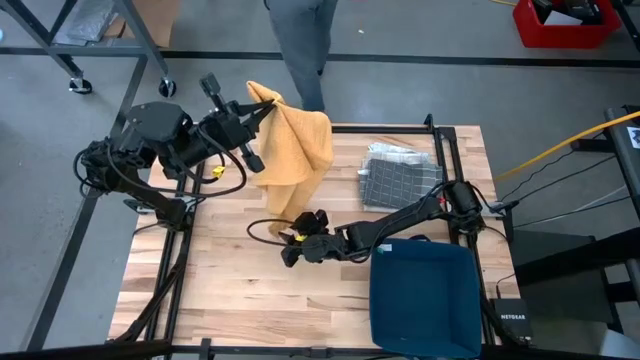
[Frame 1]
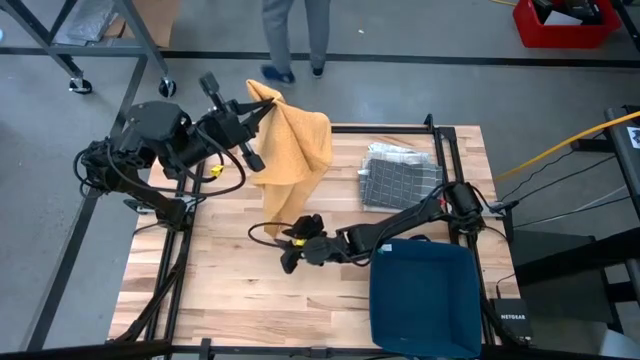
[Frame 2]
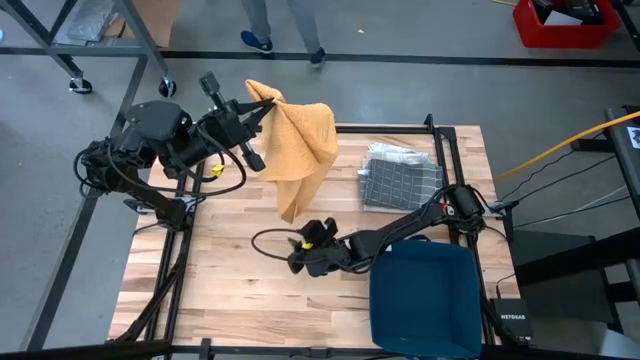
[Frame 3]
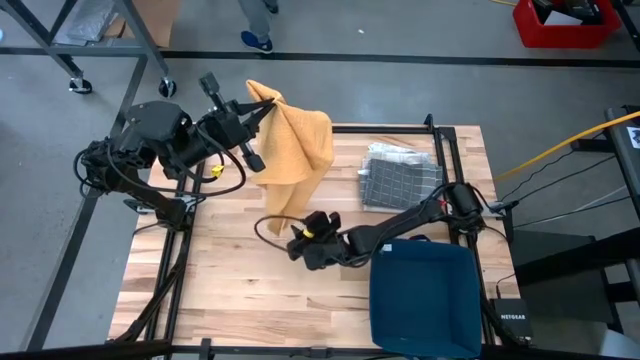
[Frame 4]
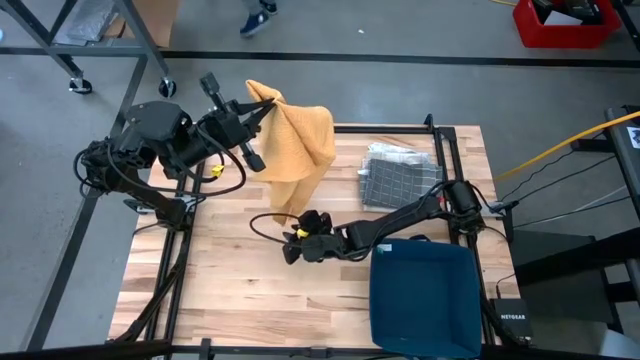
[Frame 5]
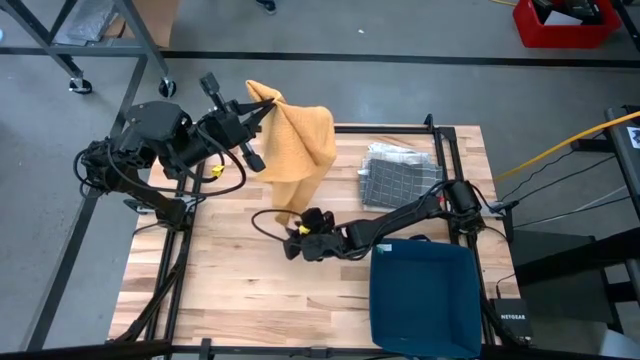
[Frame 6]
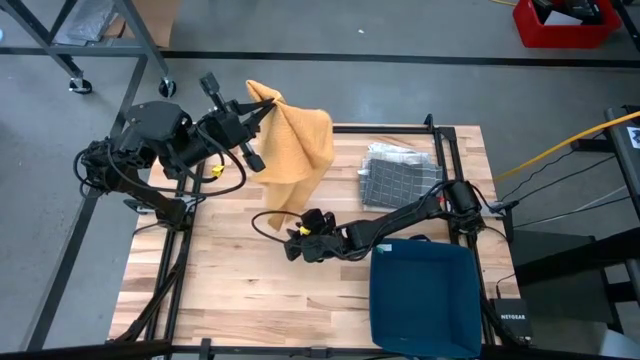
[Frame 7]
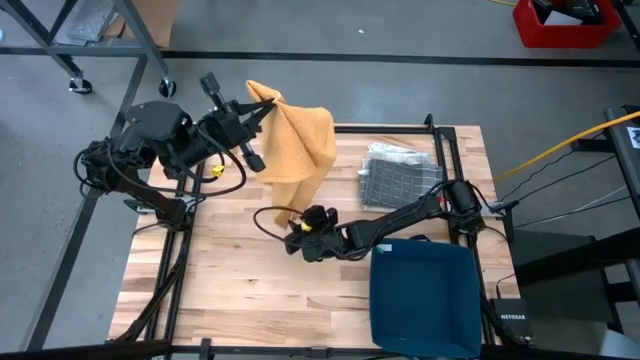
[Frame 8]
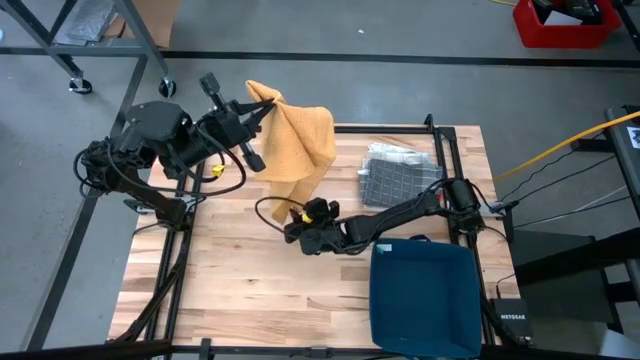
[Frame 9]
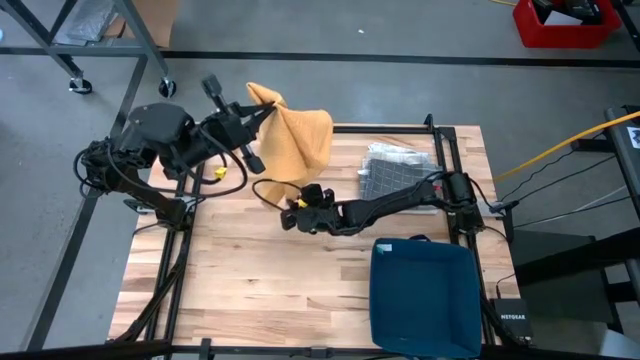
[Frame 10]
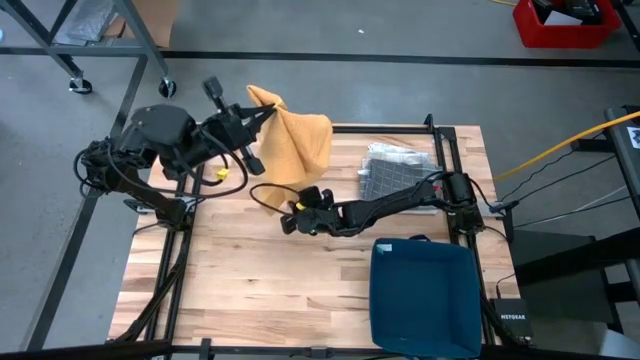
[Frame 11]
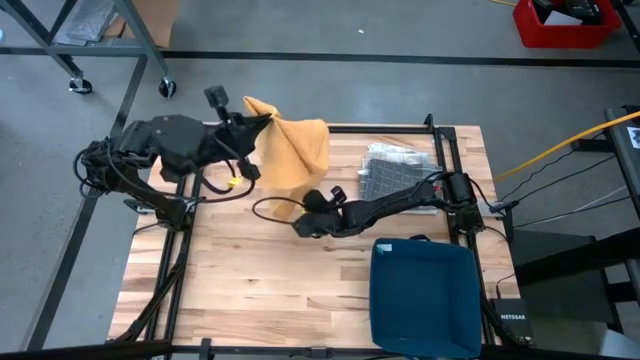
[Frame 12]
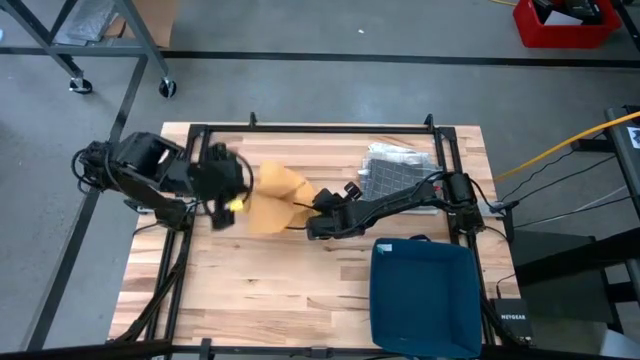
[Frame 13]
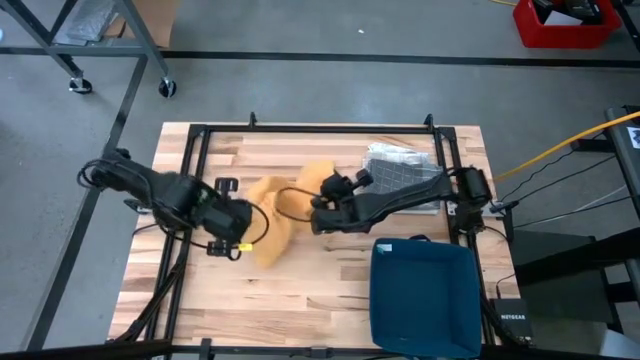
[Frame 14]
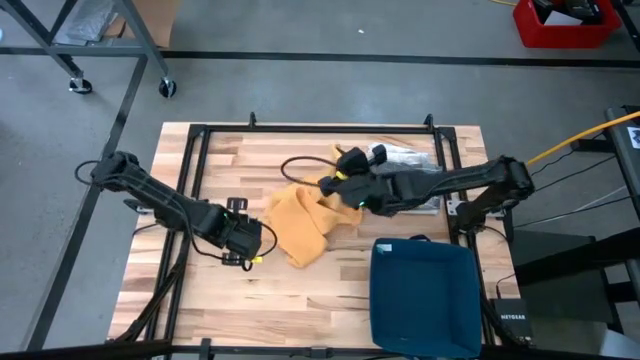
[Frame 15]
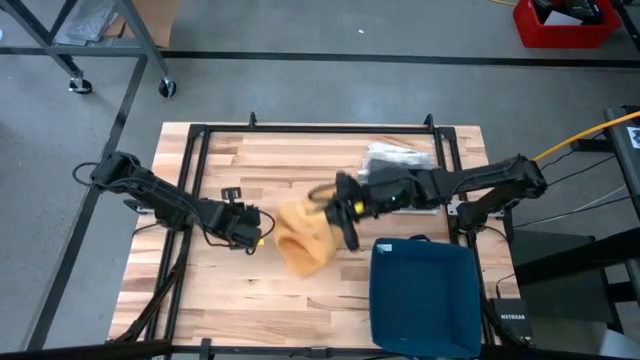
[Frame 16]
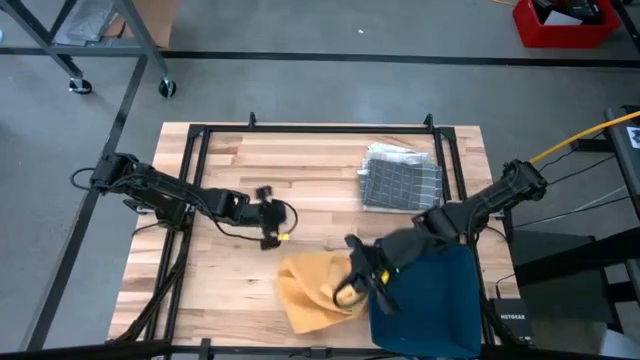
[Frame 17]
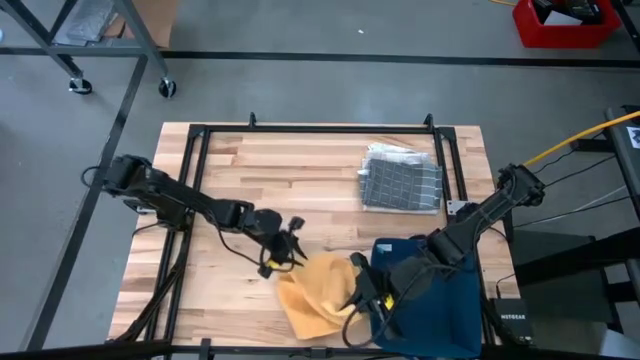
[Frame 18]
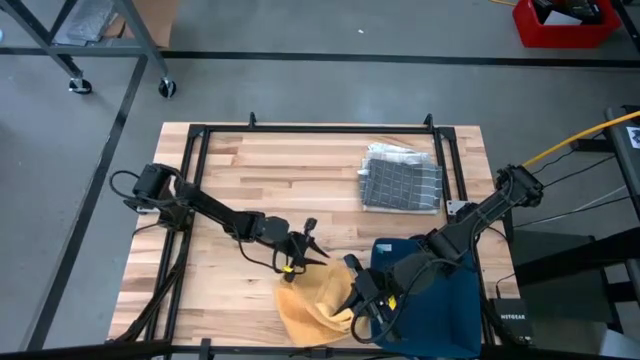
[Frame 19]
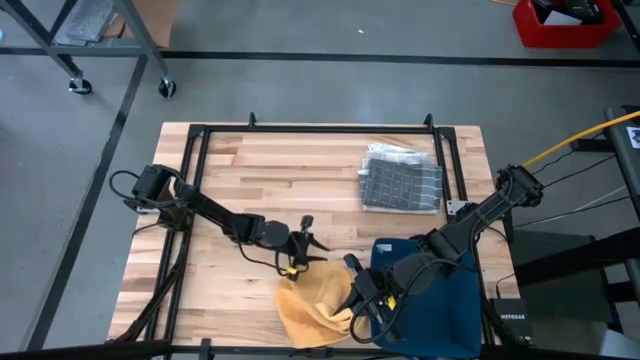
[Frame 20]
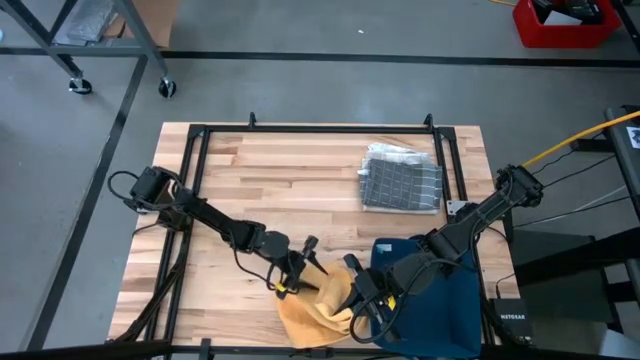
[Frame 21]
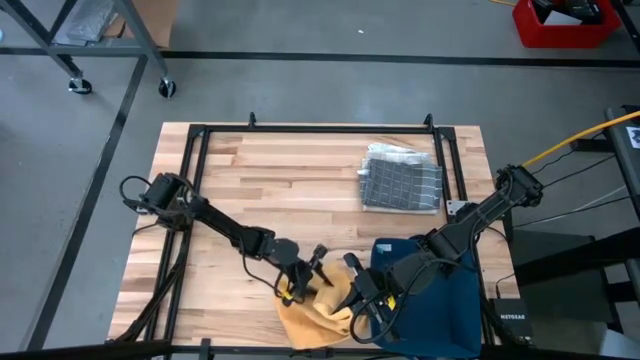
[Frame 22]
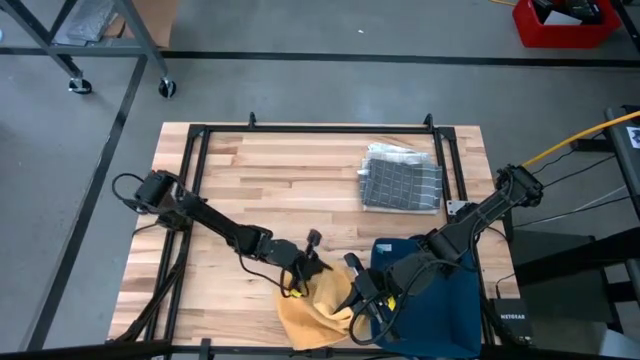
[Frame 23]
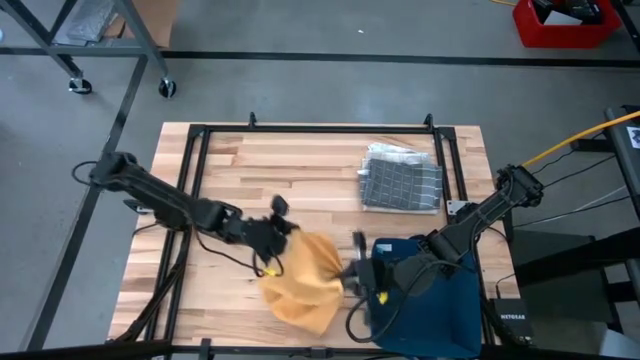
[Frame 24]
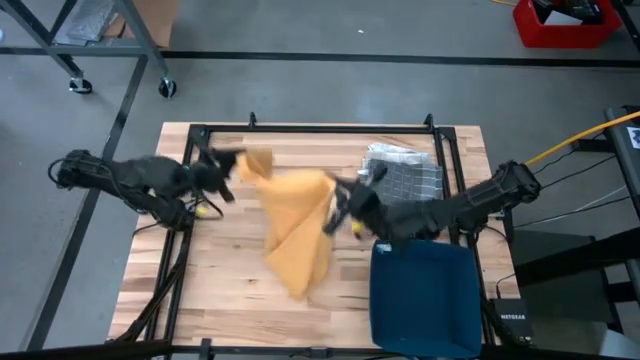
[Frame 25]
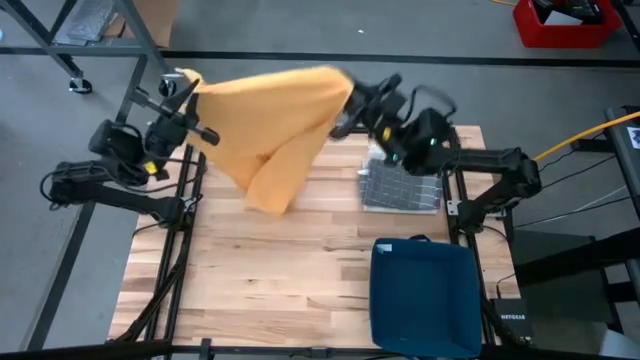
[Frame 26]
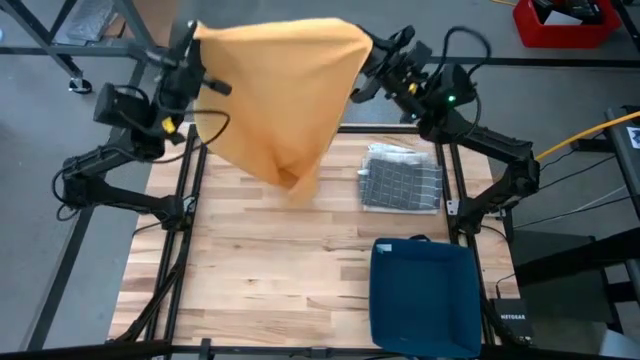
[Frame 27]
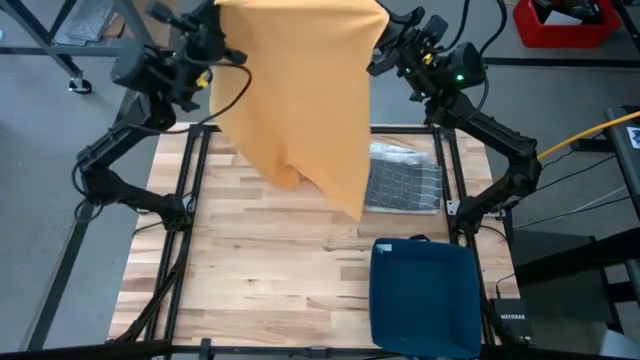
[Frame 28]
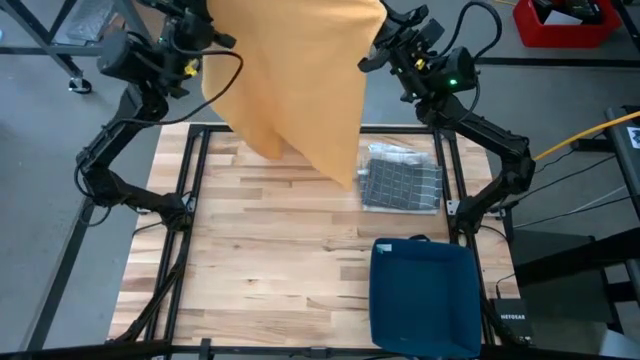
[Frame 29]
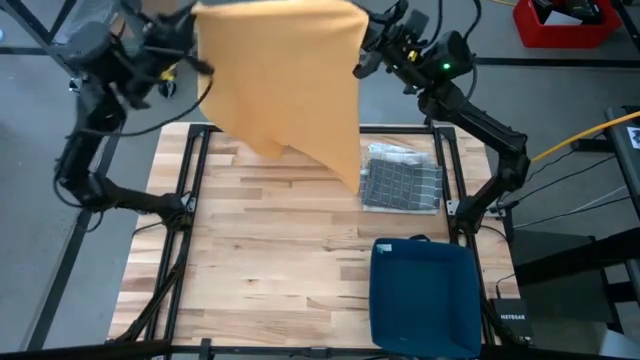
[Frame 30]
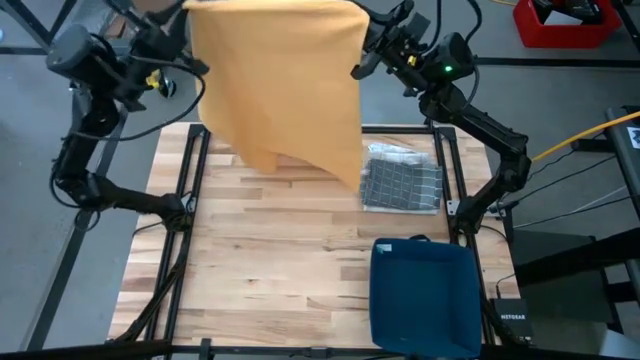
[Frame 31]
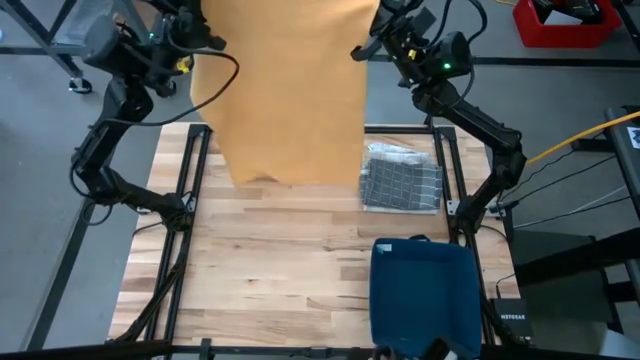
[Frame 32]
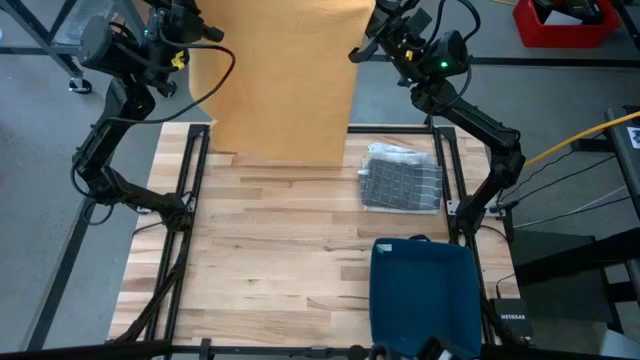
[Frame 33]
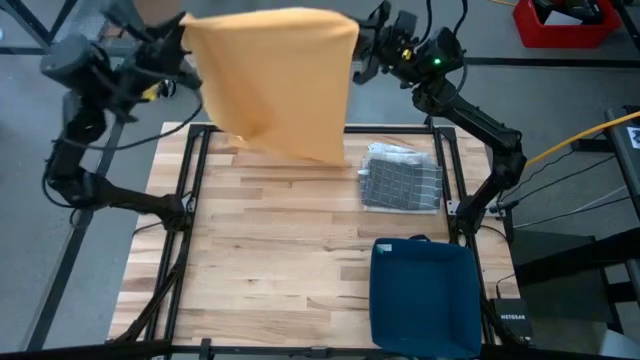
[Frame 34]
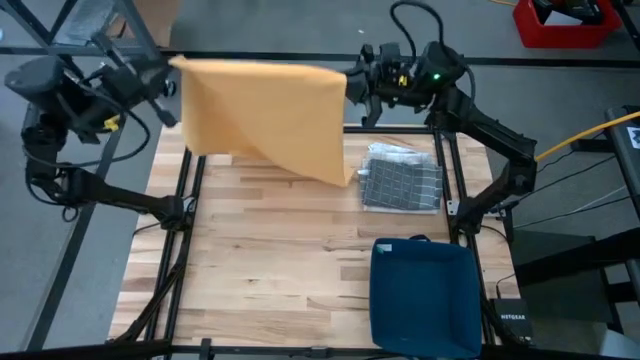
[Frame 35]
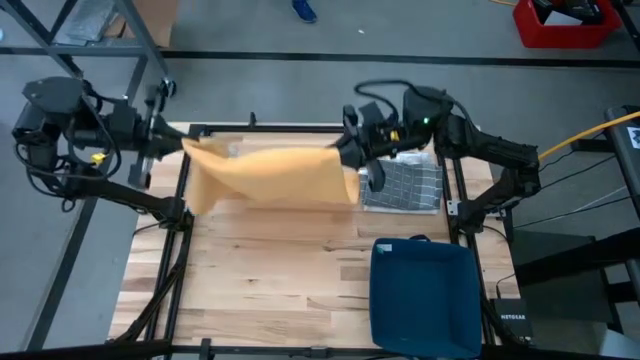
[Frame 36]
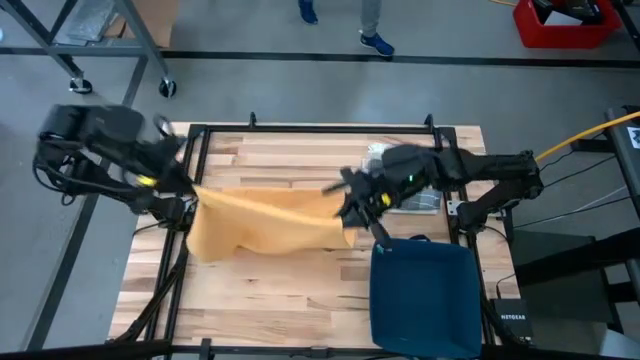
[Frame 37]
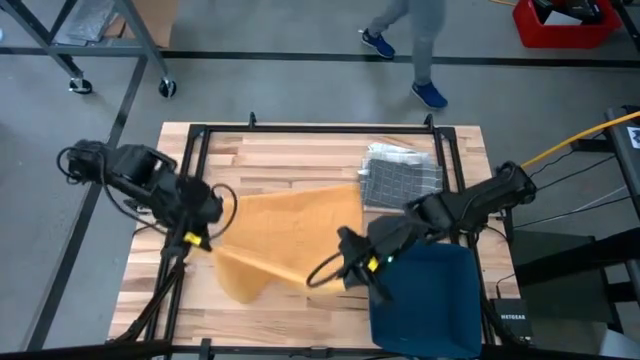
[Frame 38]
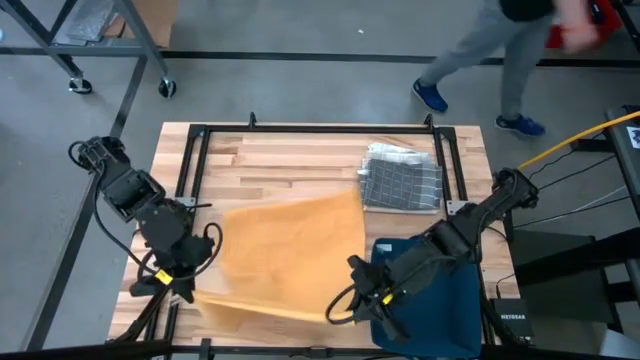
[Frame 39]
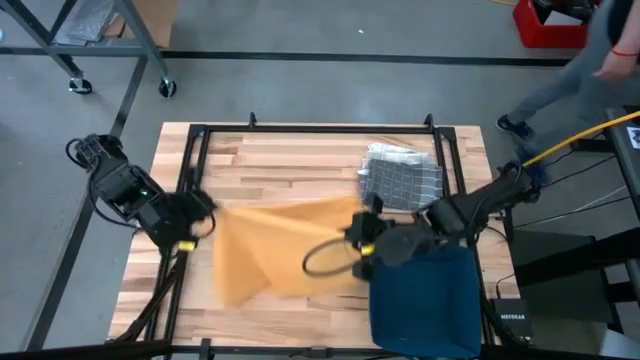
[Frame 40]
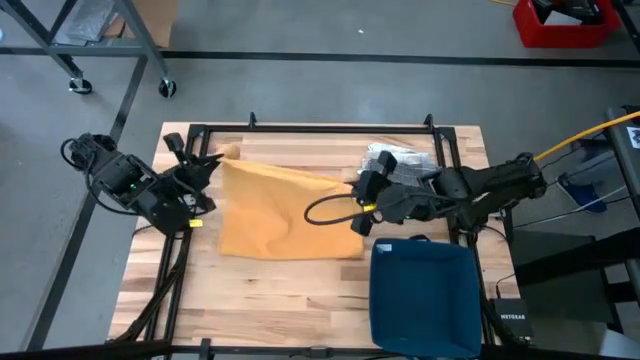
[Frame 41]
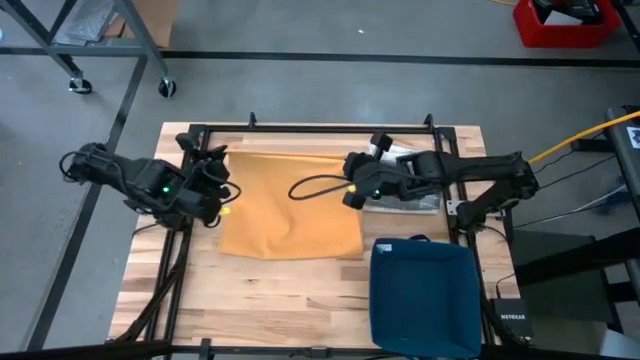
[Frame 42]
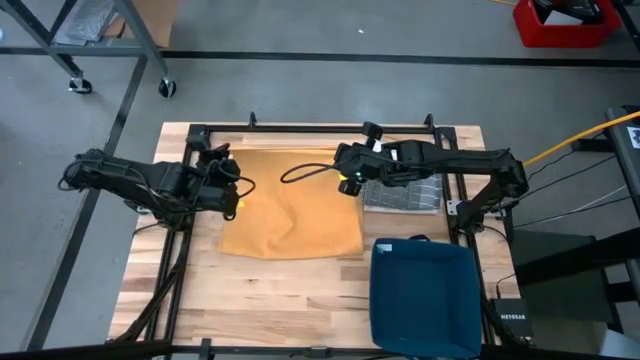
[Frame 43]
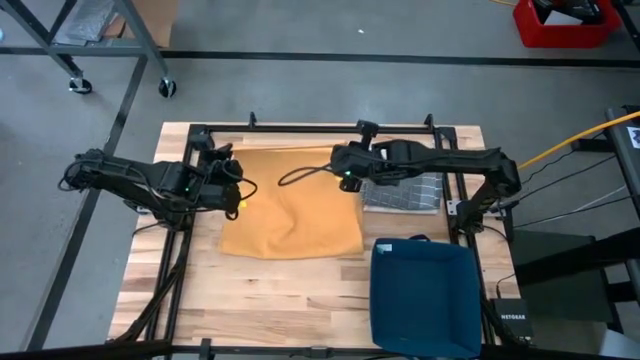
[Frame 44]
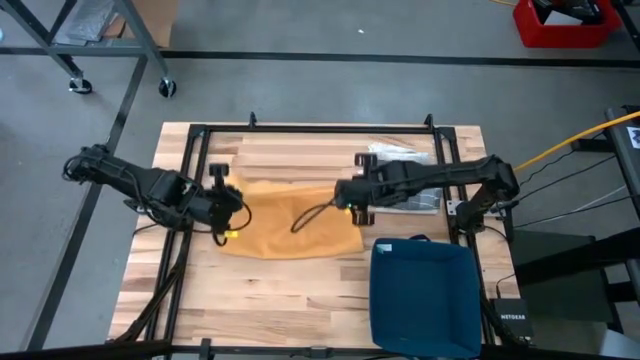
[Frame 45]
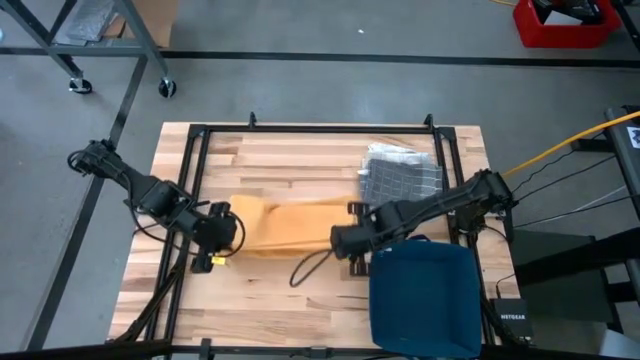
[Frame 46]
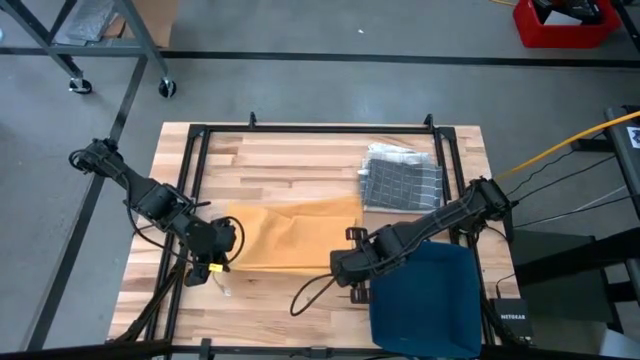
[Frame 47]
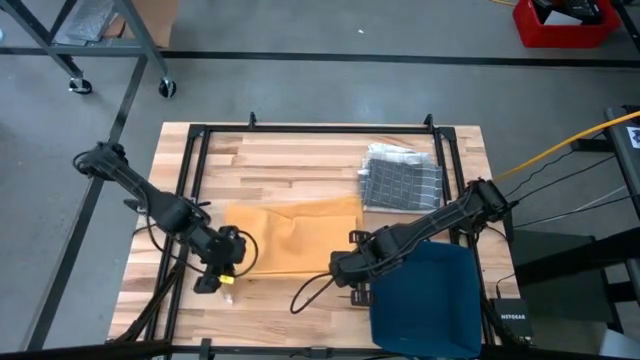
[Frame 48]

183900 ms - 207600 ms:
Task: Fold towel
Fold yellow towel
